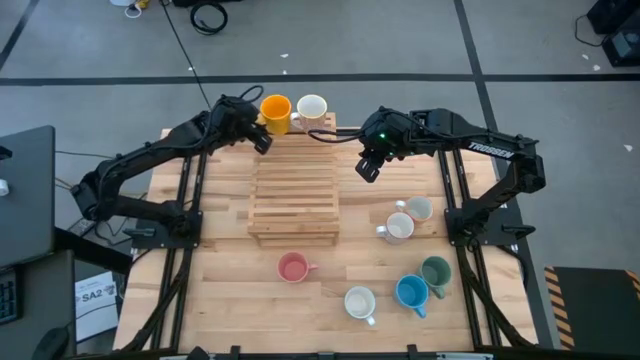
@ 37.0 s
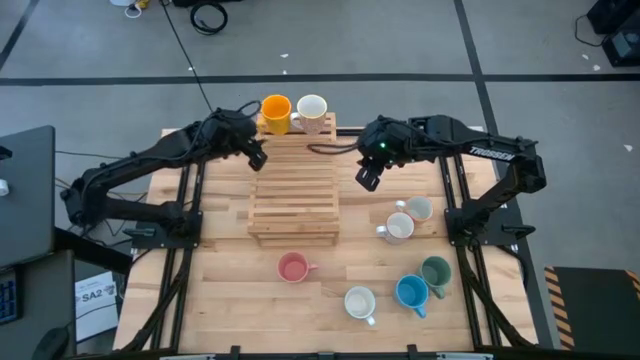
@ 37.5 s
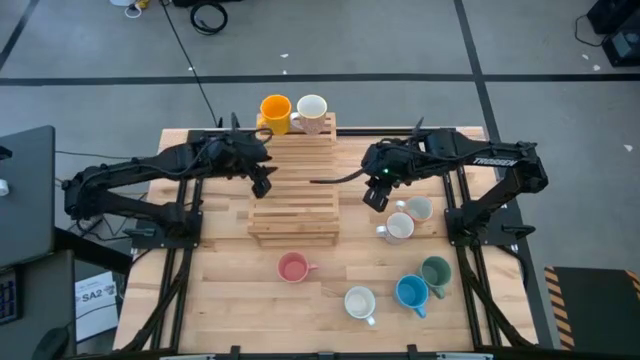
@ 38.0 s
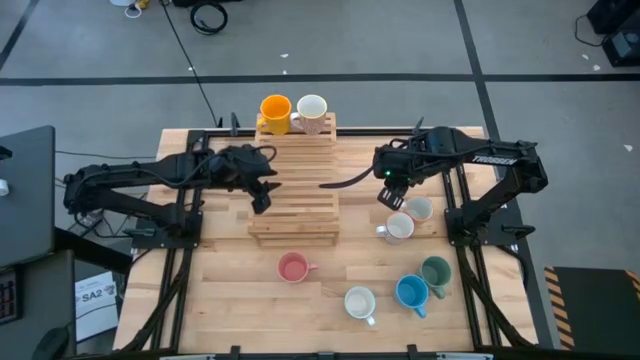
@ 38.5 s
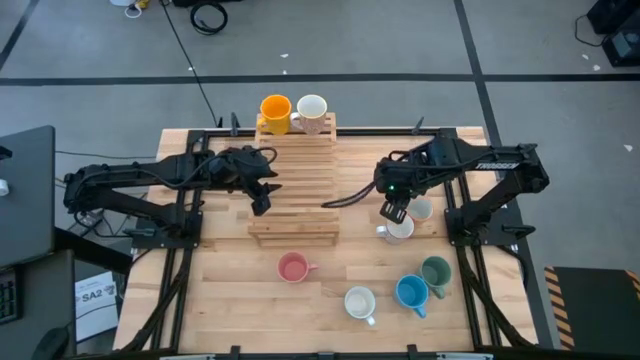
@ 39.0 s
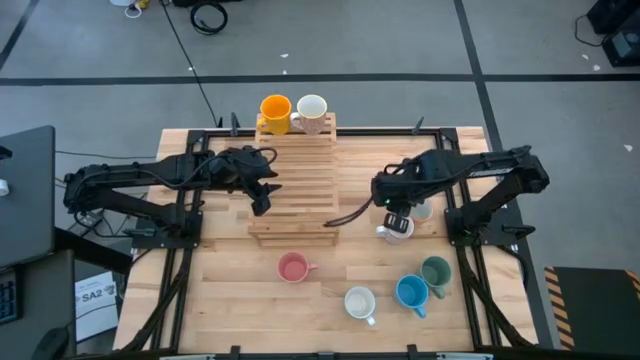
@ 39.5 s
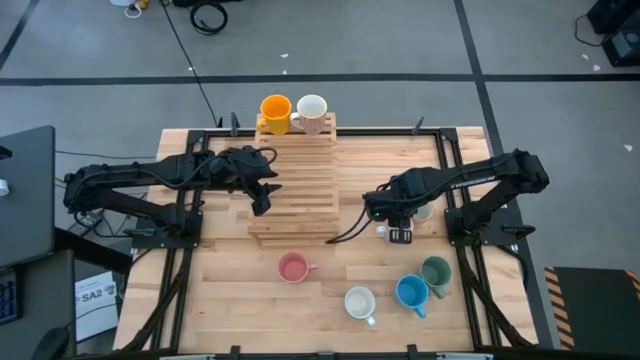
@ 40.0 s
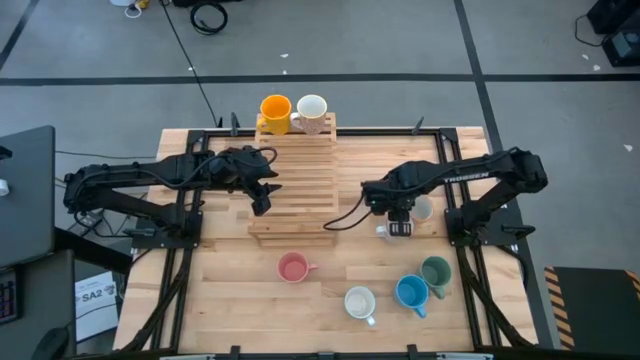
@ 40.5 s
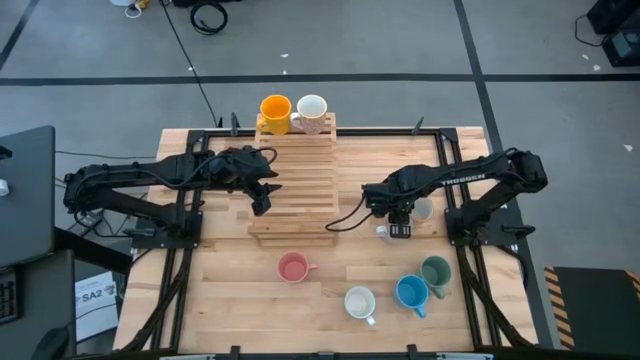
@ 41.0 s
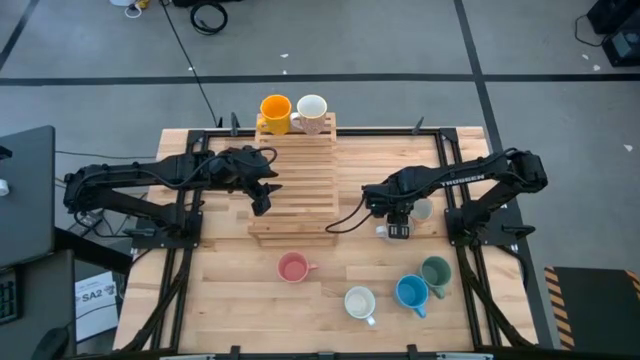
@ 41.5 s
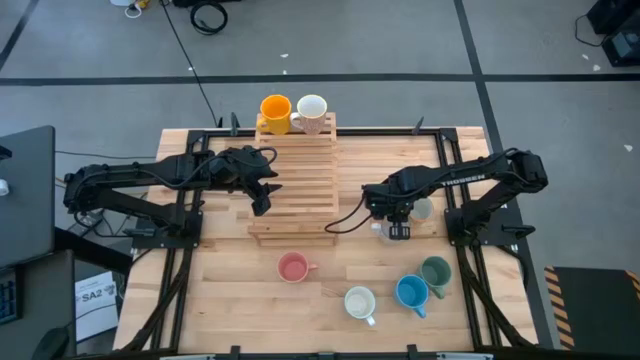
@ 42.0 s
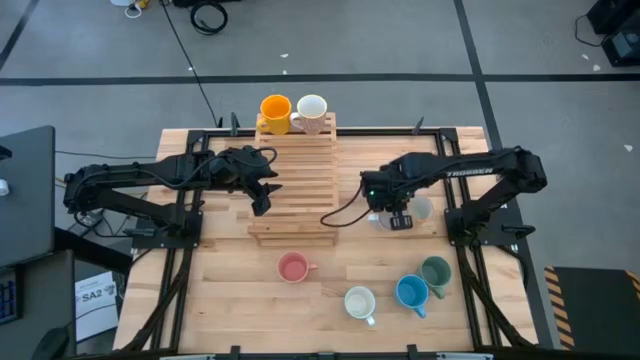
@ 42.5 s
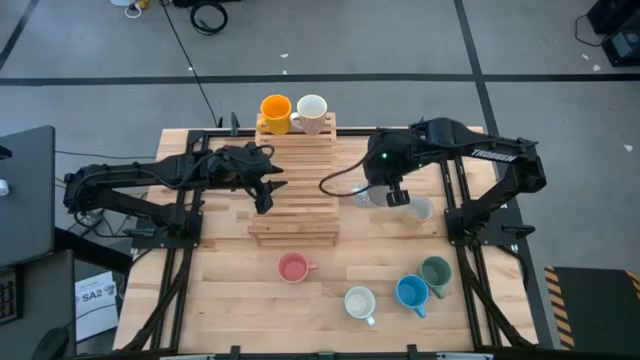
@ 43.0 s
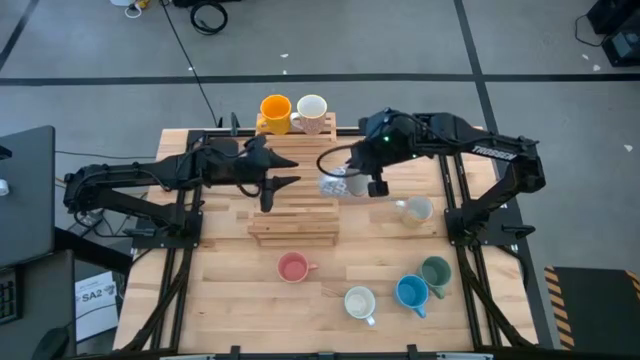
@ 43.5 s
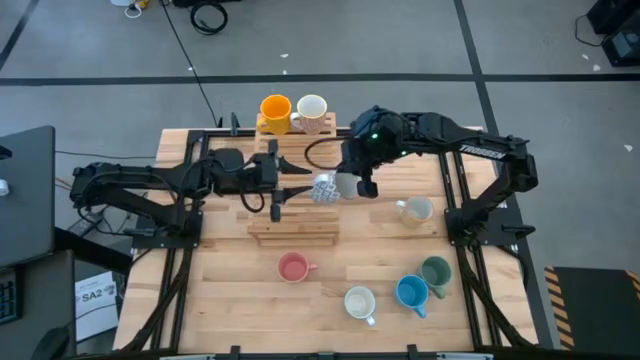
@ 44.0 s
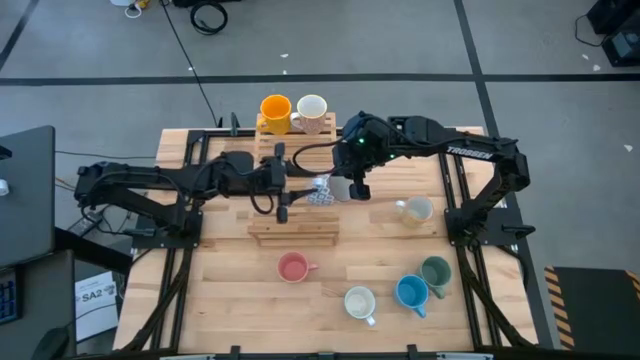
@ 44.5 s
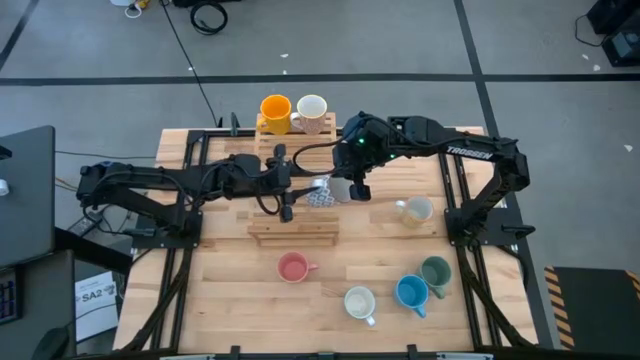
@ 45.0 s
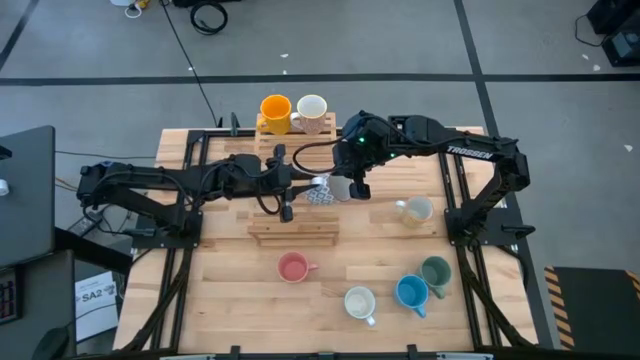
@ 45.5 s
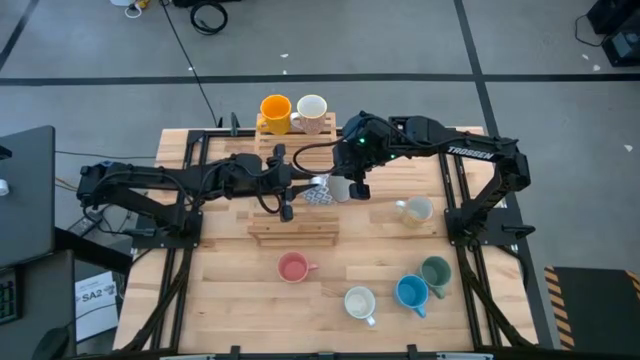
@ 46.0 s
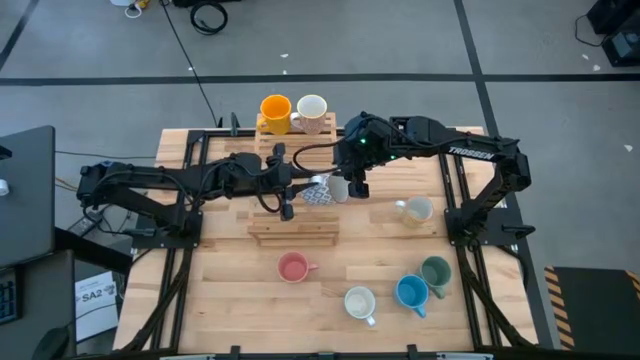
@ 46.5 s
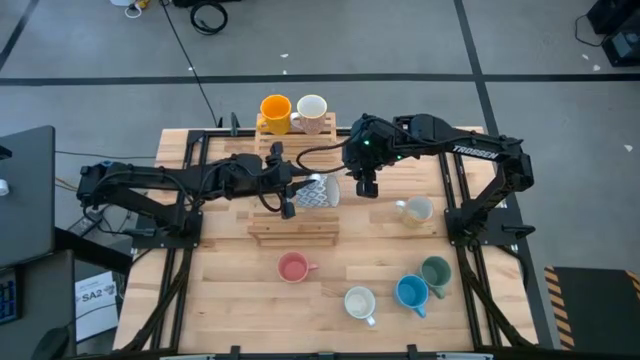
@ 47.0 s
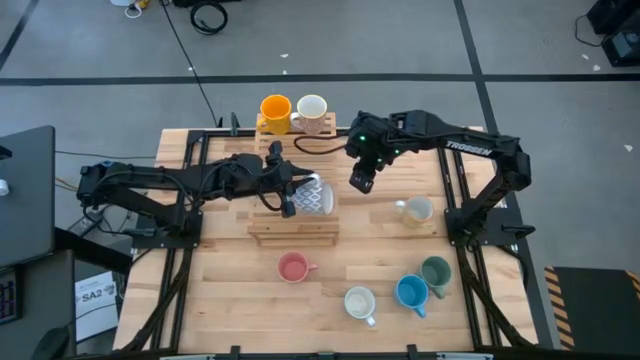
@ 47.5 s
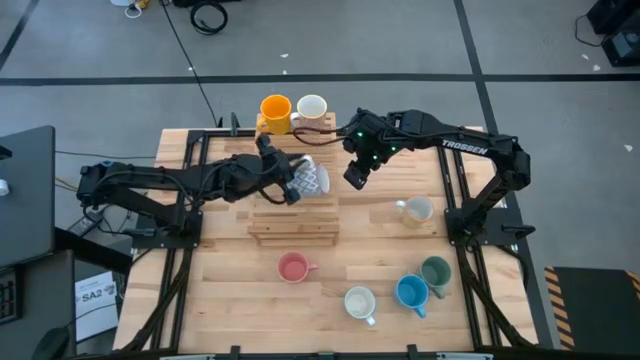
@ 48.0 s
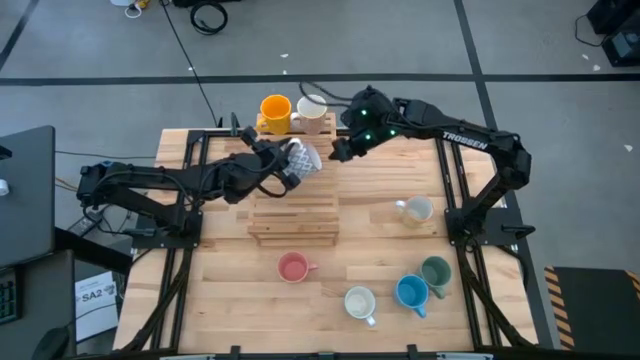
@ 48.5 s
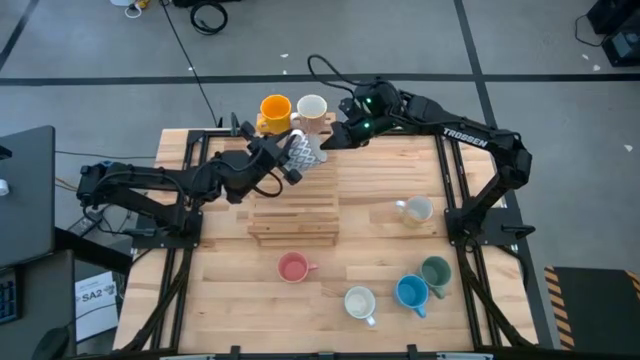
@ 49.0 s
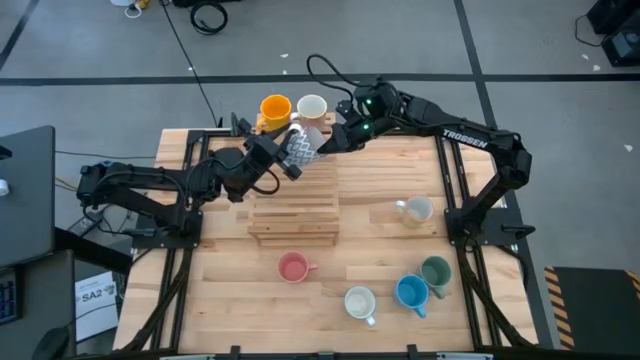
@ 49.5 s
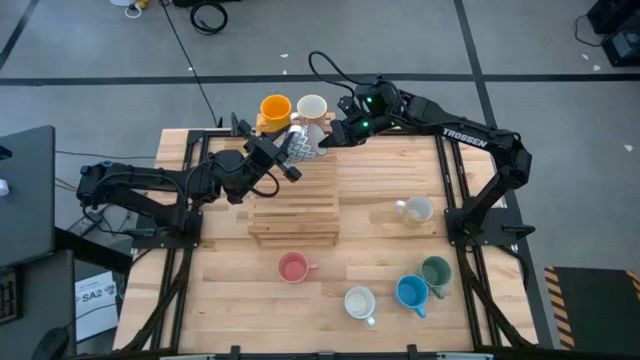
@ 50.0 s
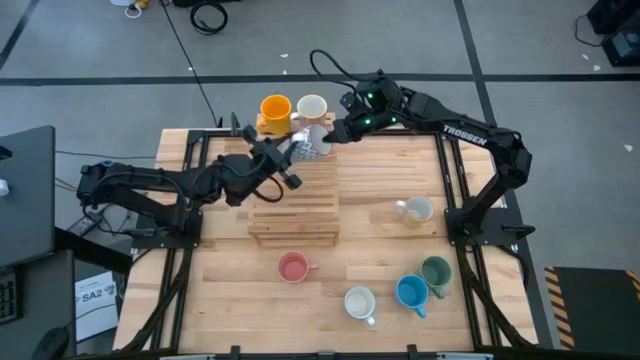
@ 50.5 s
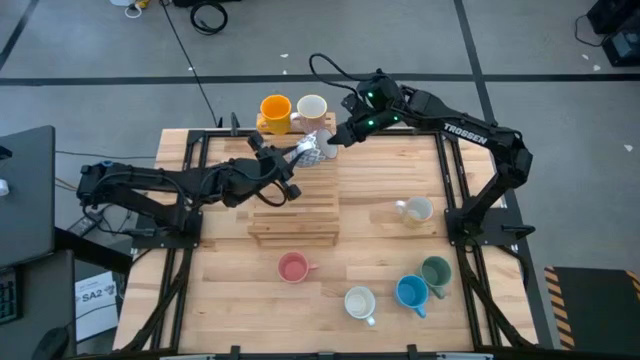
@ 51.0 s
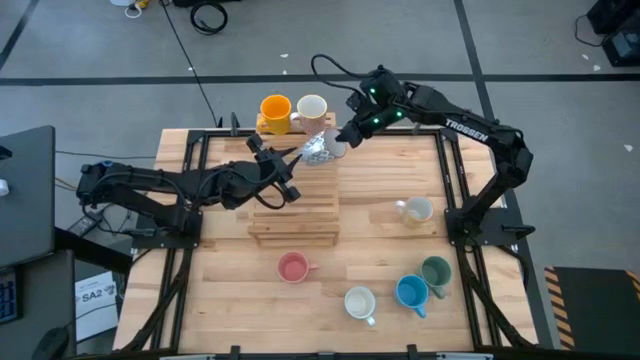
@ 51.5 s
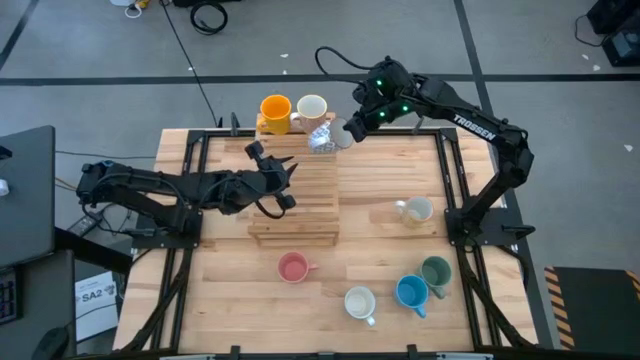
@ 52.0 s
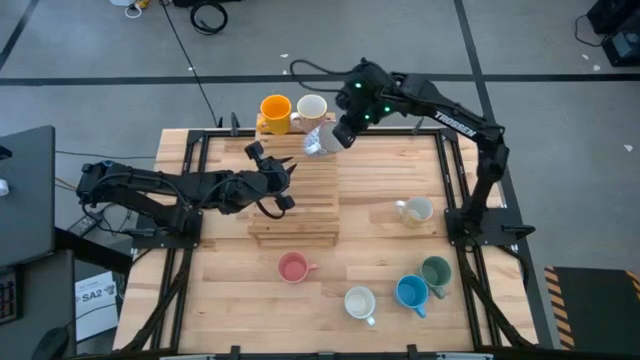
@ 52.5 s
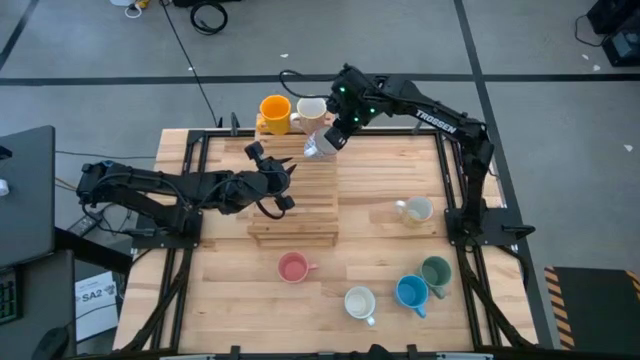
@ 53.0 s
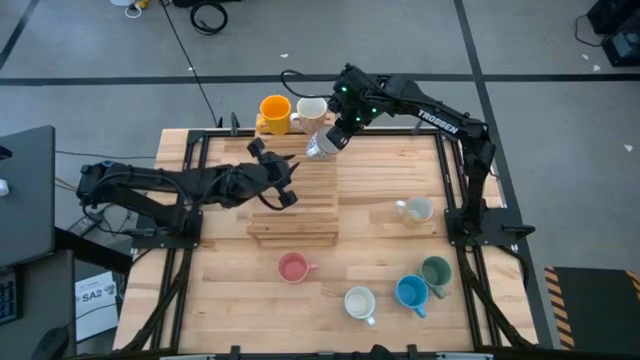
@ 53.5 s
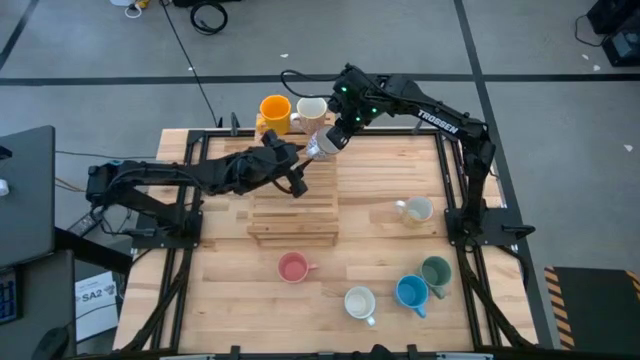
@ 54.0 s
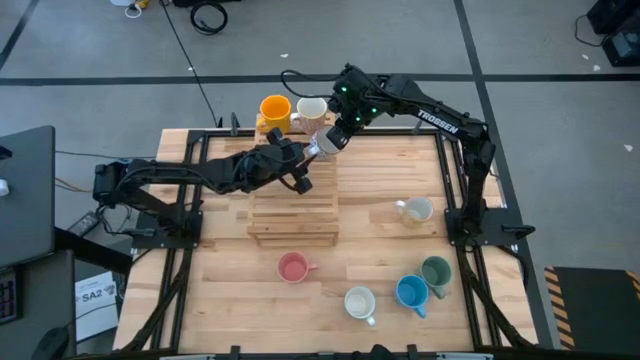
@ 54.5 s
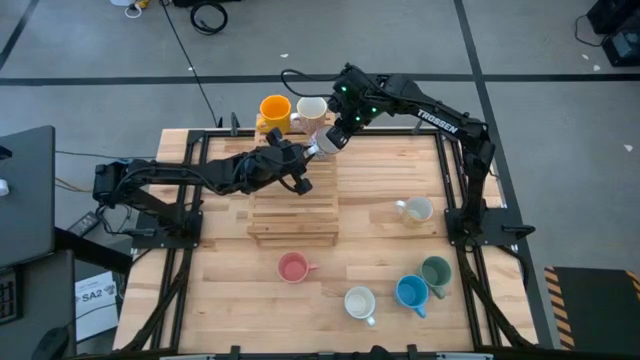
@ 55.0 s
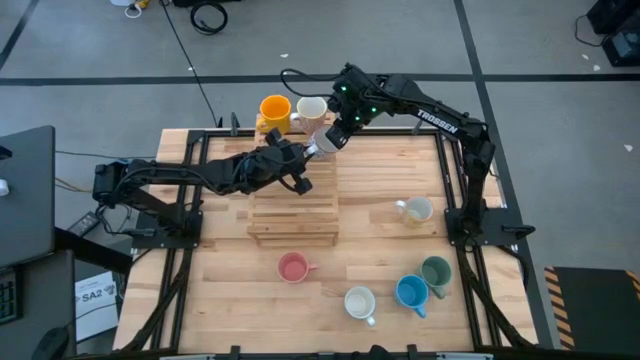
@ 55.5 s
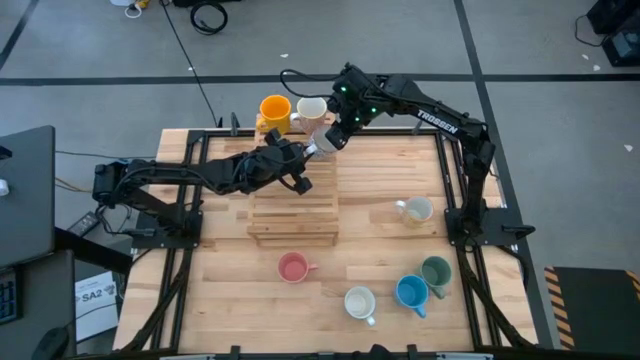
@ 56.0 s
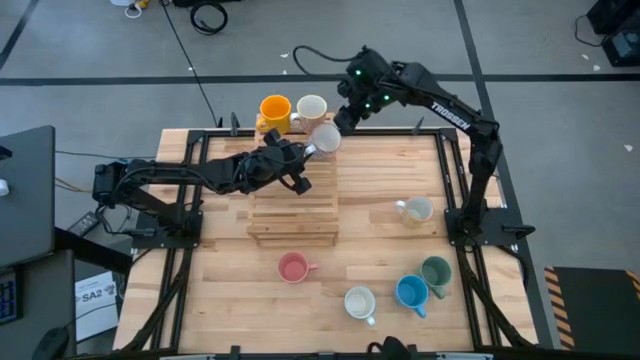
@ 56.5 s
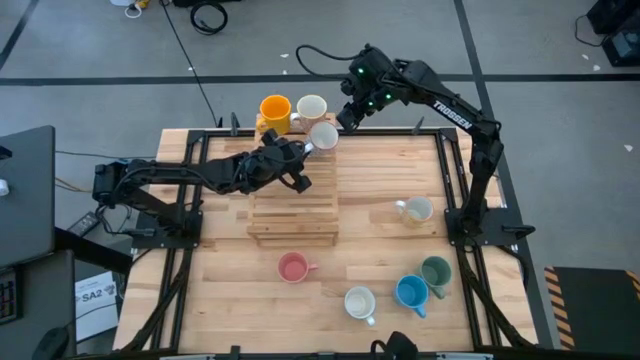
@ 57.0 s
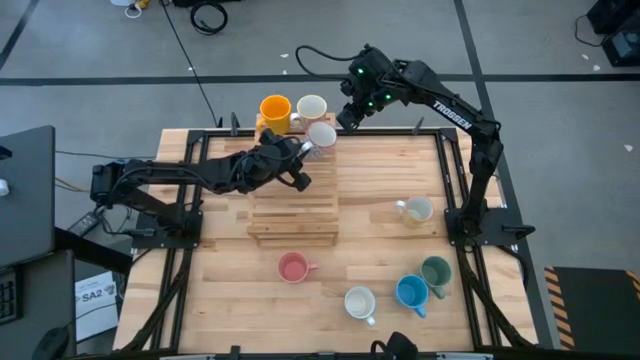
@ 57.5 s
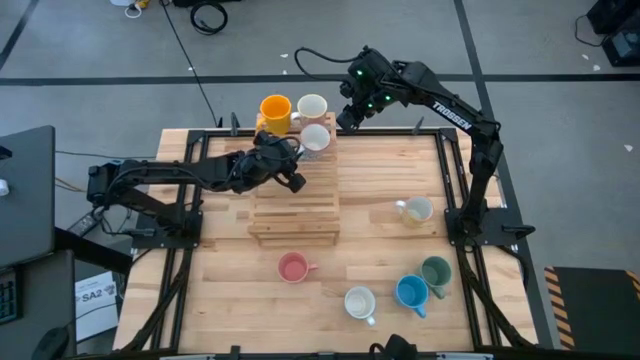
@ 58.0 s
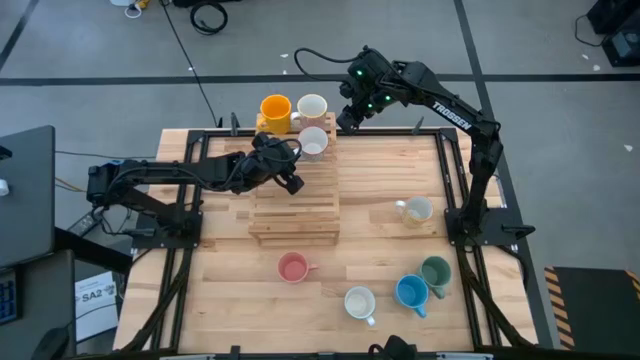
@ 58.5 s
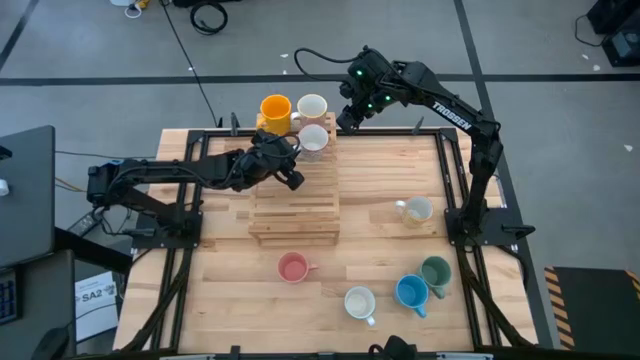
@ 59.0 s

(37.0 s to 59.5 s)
Task: Place coffee mugs
Put the gray mug on the shelf
